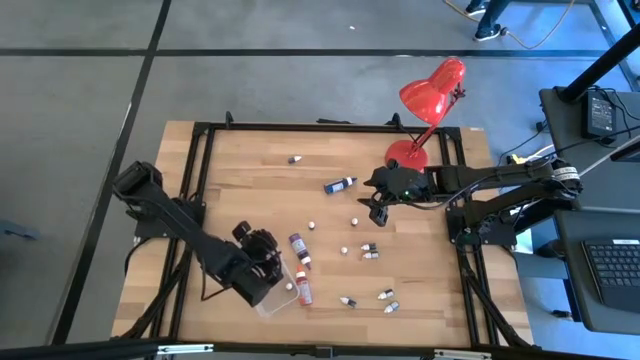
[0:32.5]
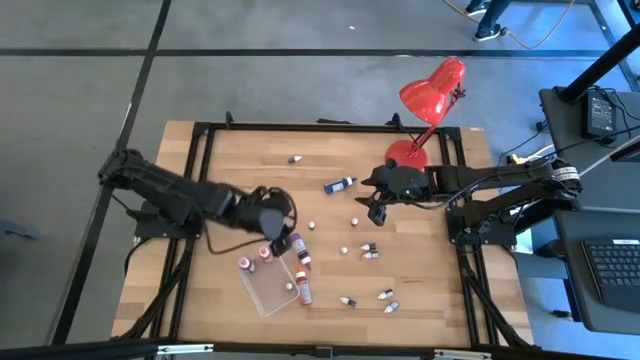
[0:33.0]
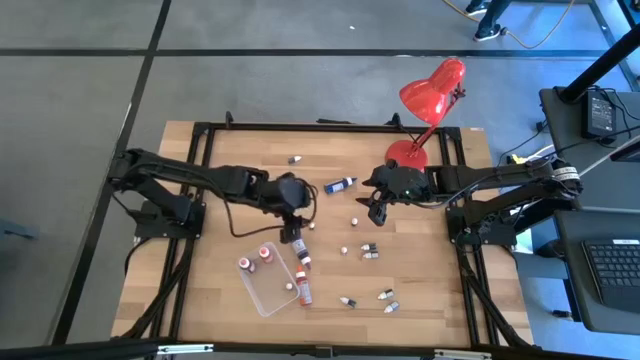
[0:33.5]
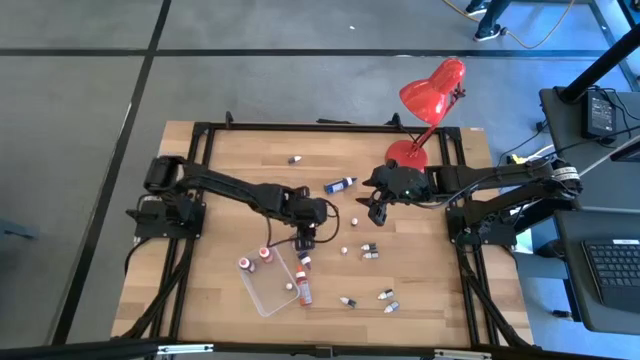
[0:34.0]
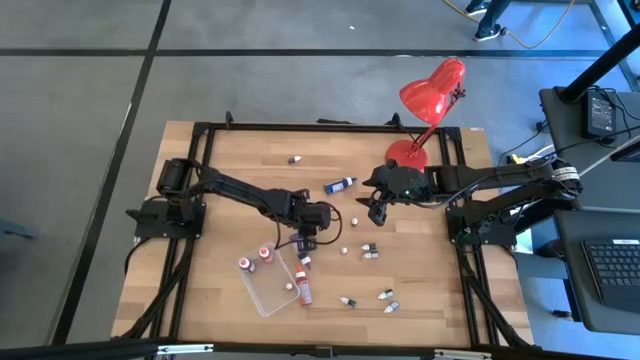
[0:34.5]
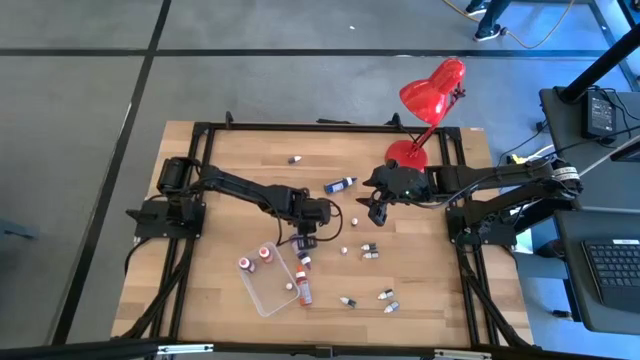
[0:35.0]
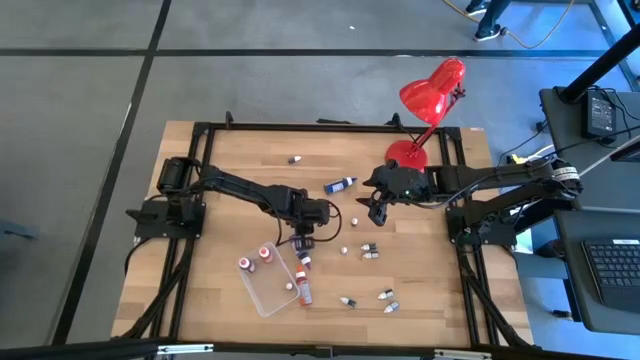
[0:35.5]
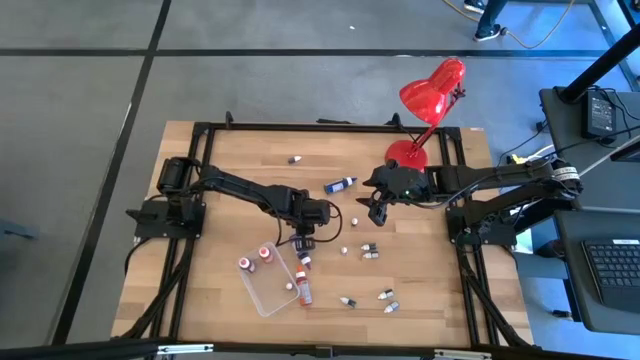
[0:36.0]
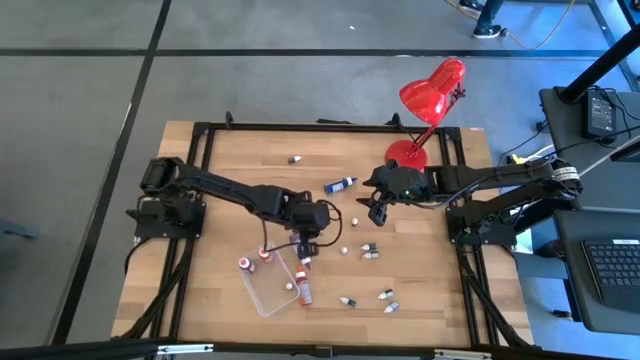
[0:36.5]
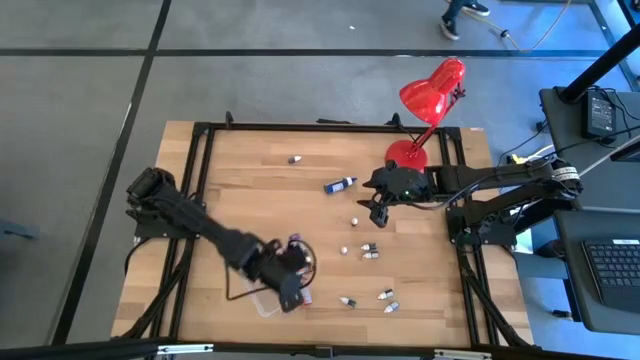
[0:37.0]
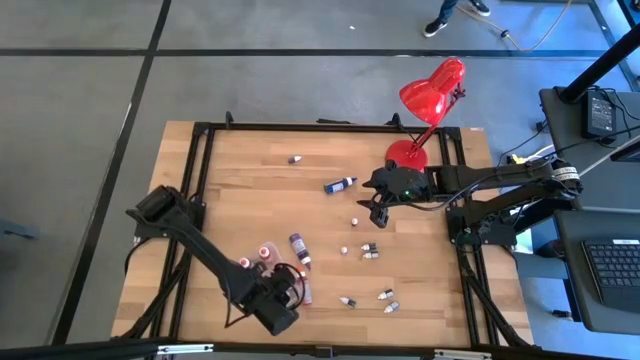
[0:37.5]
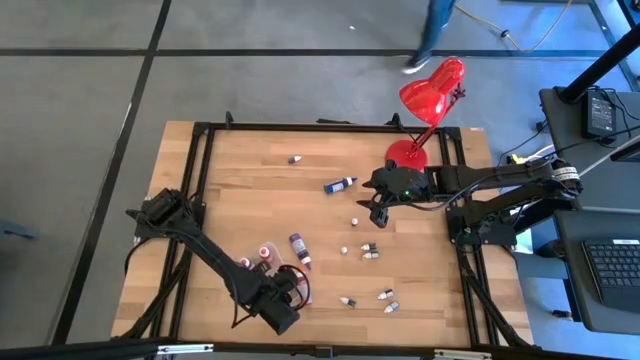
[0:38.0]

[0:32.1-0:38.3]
Task: Pick & Place food coloring
Put the green food coloring bottle into the transparent bin

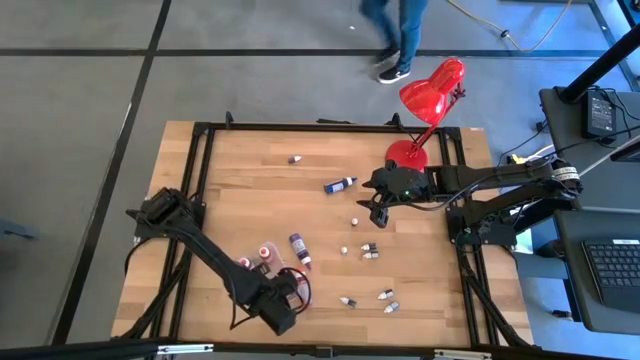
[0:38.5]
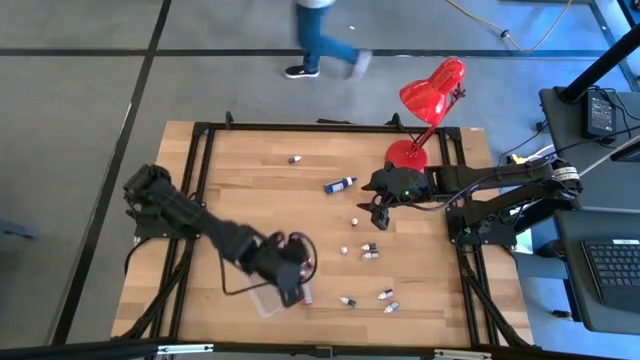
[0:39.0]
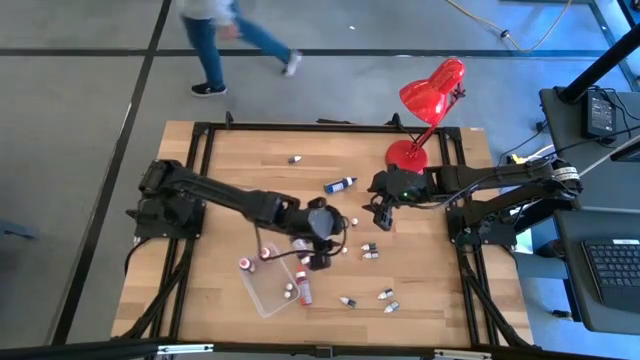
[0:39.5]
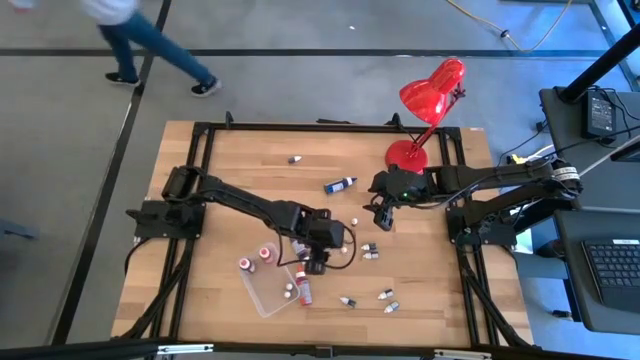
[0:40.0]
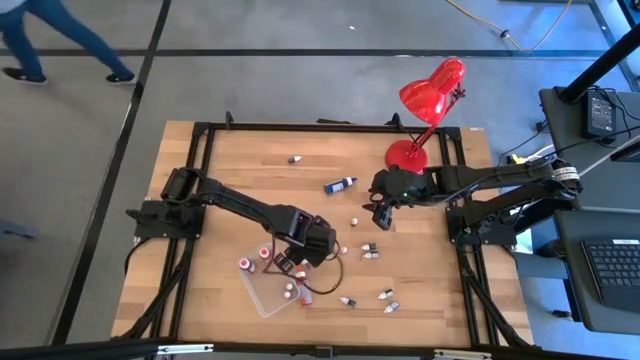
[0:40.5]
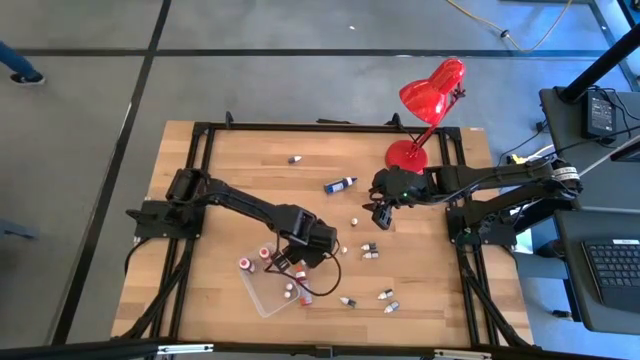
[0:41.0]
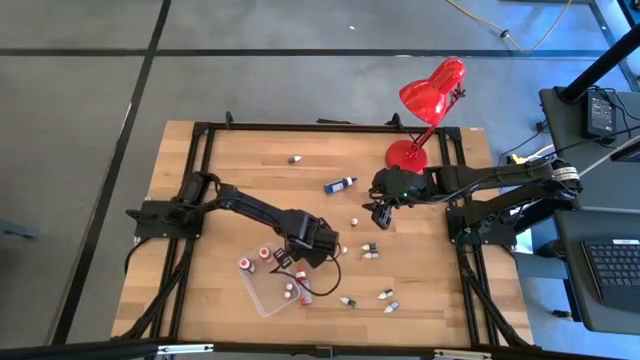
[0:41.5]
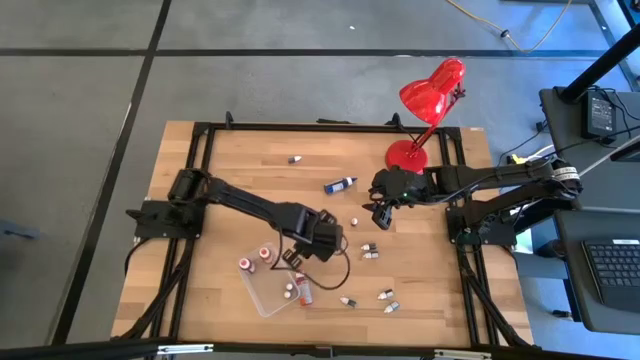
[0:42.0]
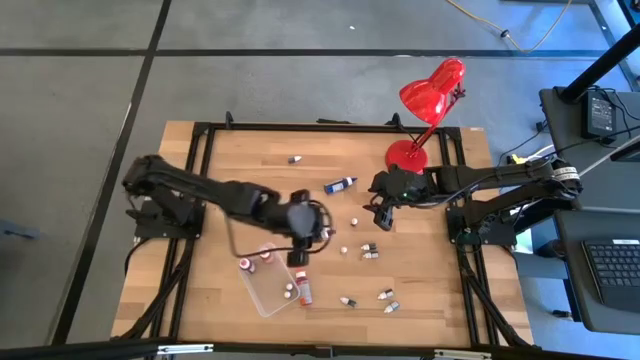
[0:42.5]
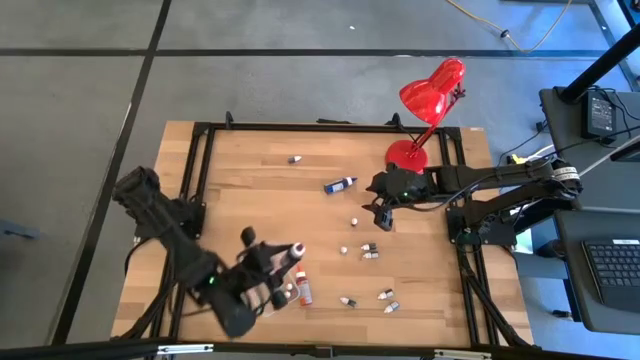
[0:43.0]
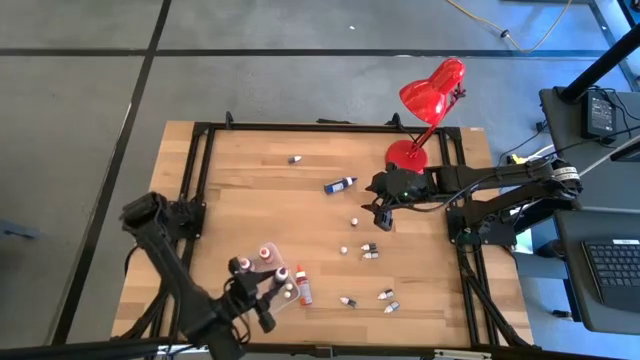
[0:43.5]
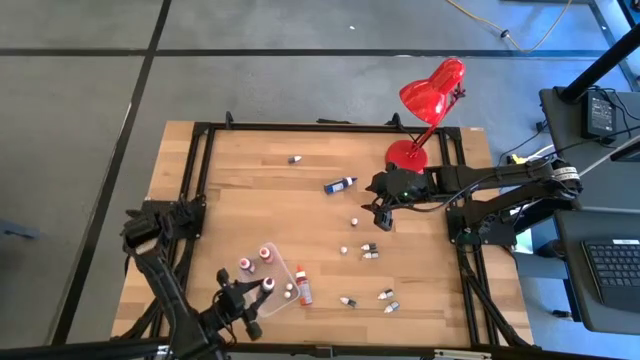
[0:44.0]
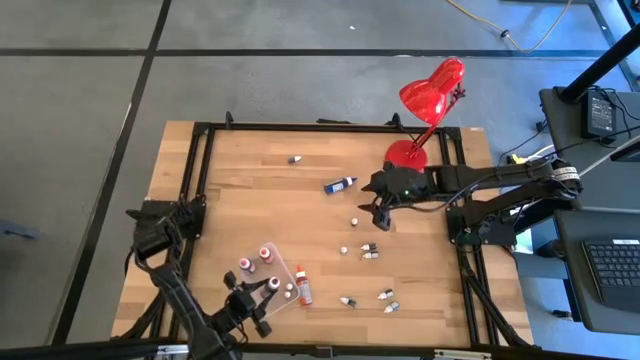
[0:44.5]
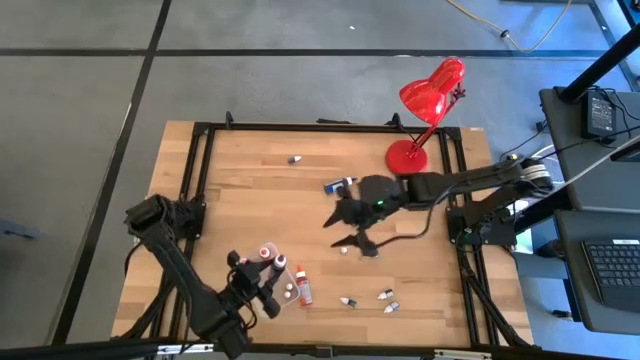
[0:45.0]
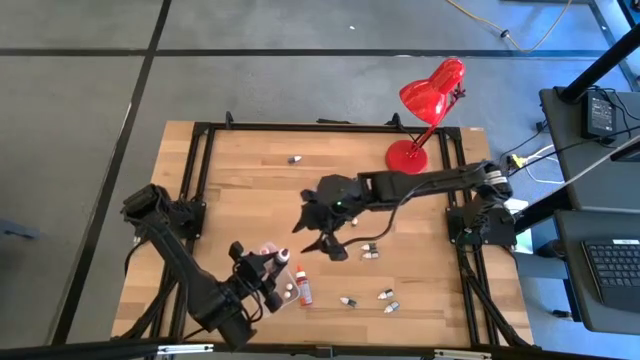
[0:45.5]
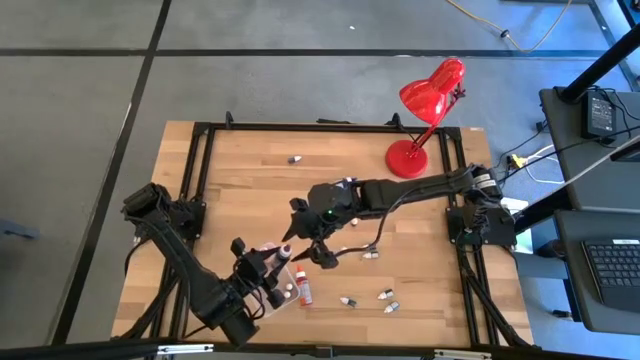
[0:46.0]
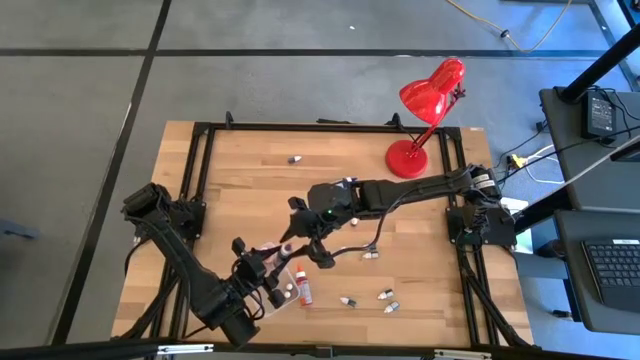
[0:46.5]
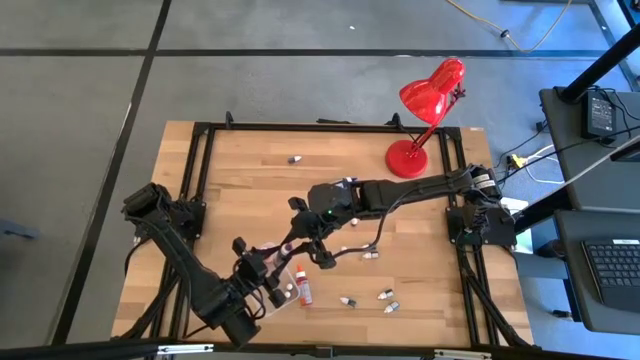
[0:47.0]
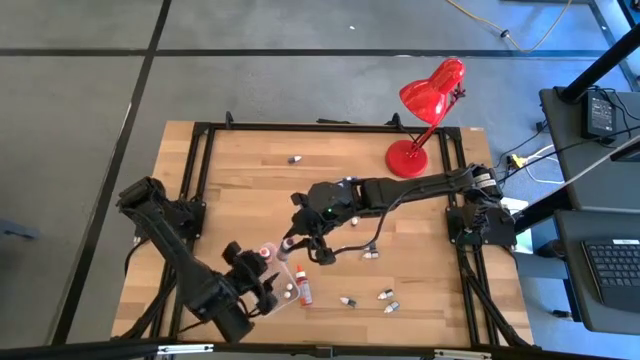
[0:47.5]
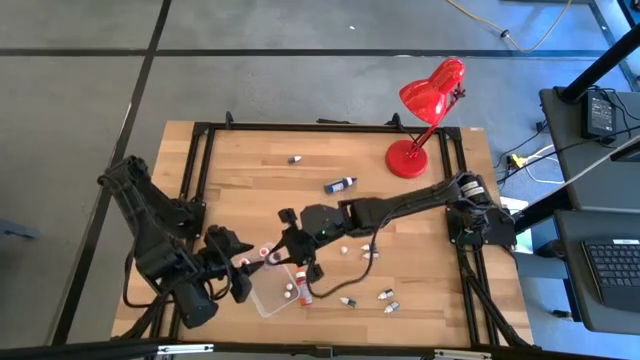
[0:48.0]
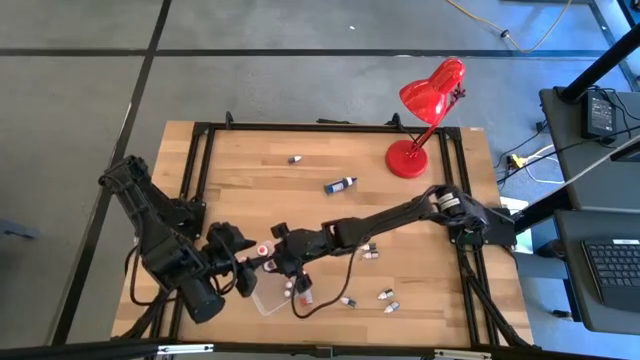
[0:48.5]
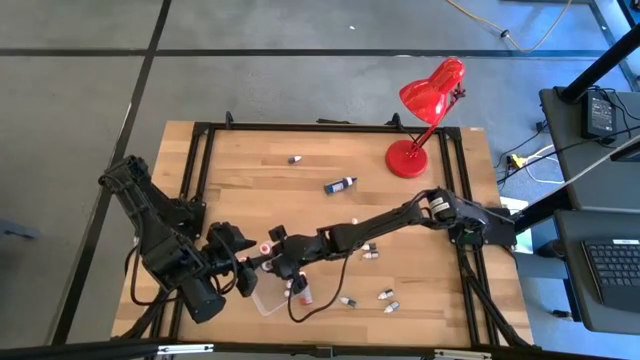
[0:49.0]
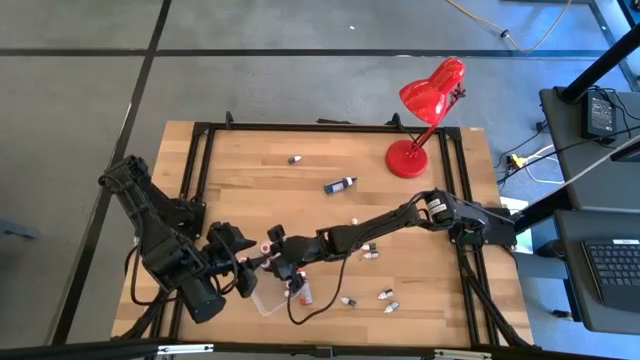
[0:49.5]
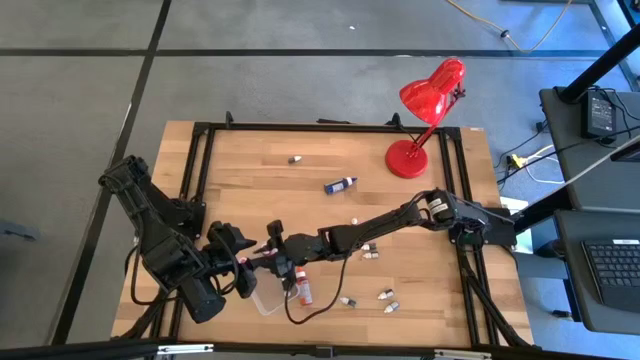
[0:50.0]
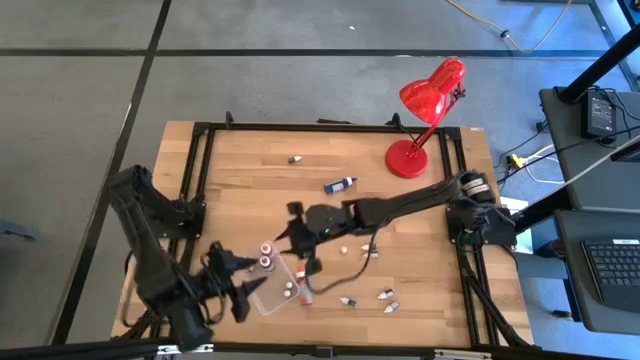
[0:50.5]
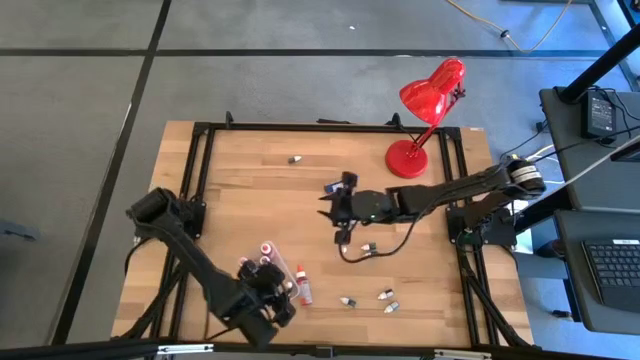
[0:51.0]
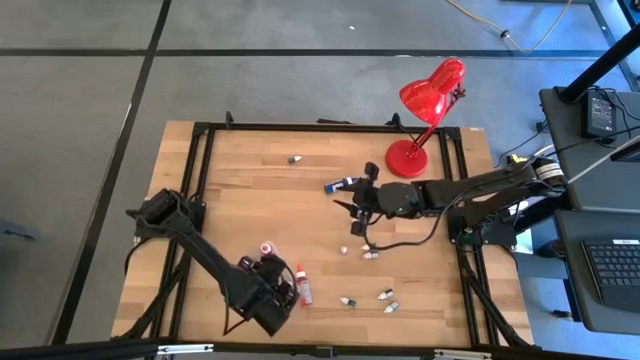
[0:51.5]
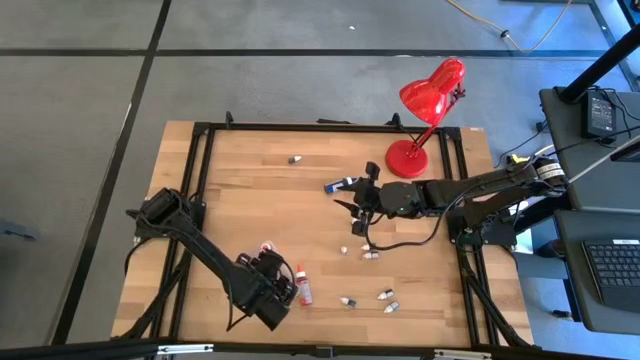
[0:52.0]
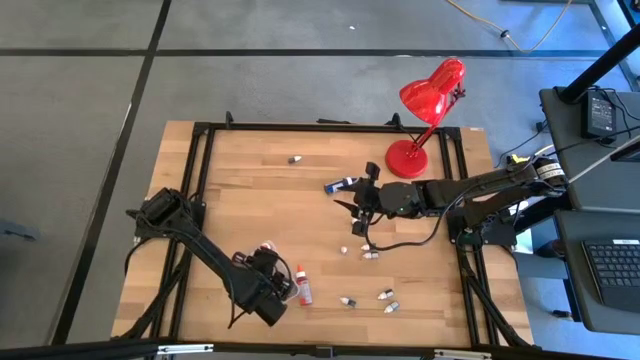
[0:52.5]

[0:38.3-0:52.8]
Put the purple food coloring bottle into the transparent bin
